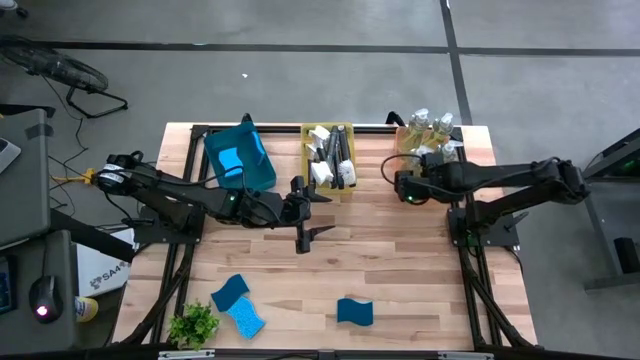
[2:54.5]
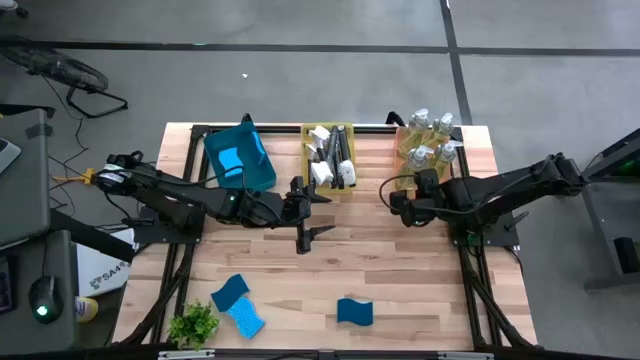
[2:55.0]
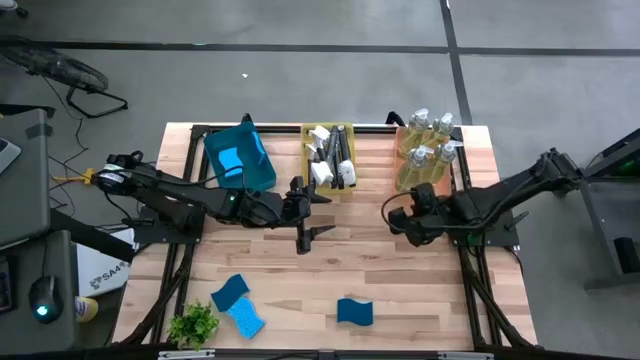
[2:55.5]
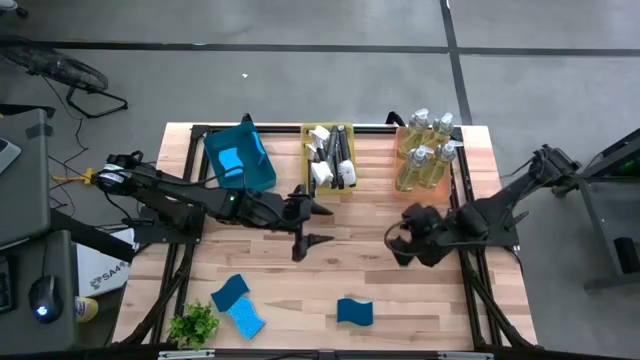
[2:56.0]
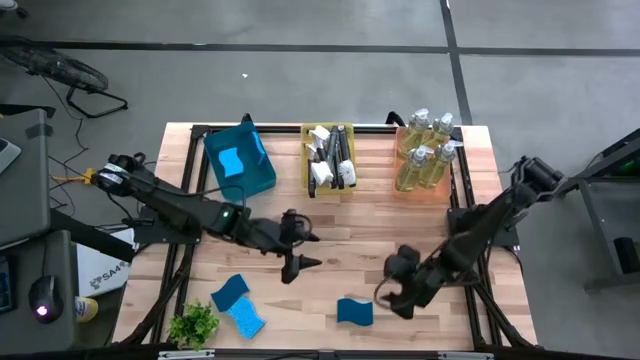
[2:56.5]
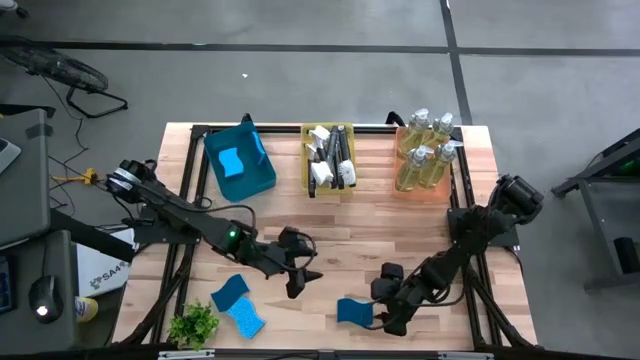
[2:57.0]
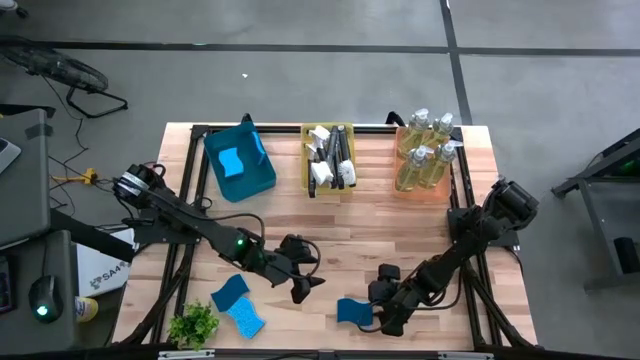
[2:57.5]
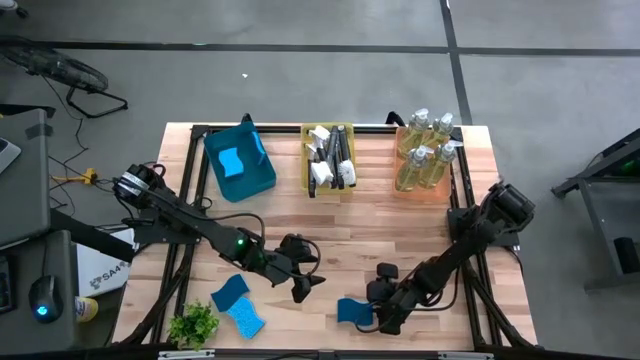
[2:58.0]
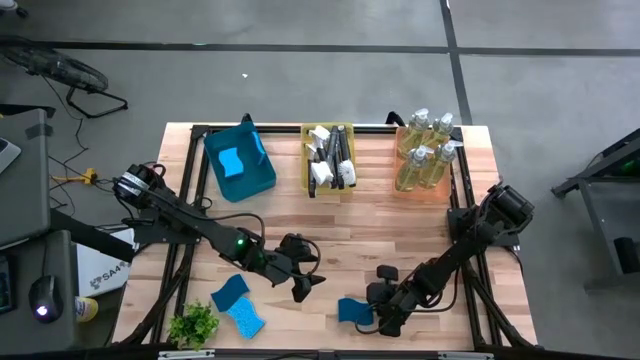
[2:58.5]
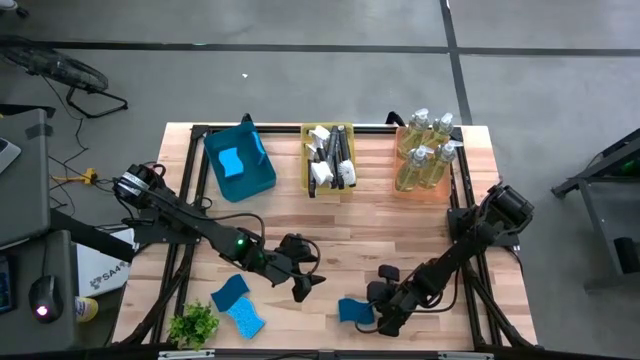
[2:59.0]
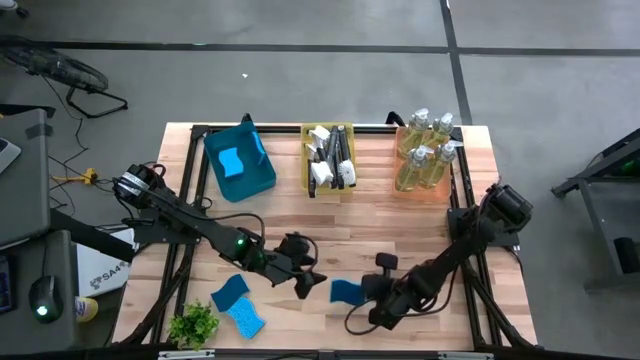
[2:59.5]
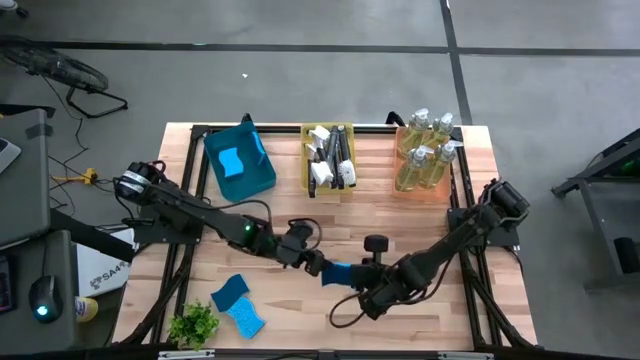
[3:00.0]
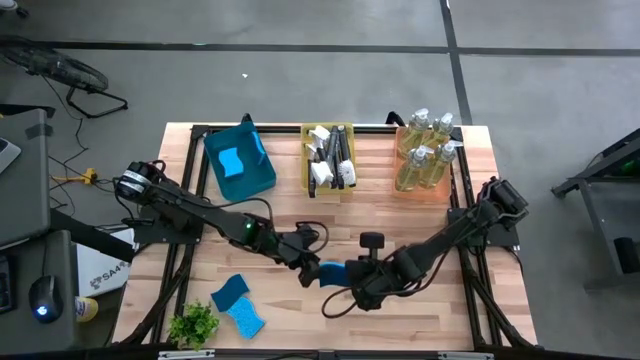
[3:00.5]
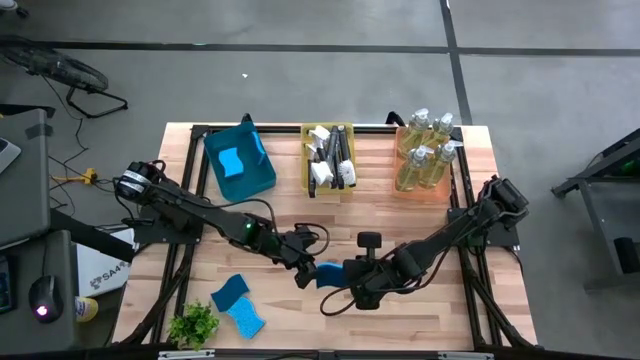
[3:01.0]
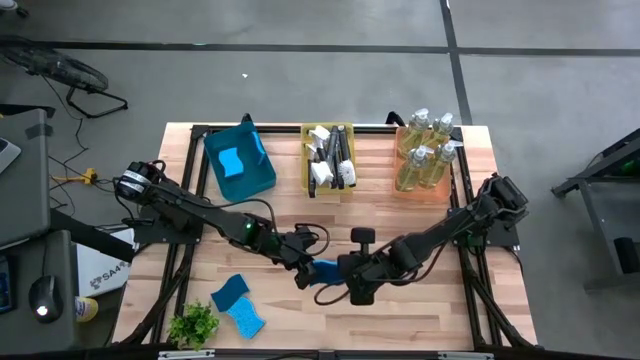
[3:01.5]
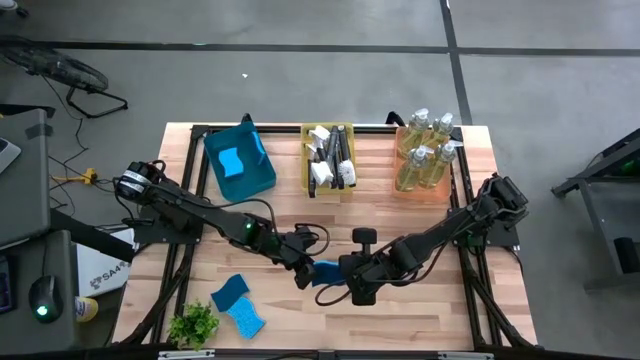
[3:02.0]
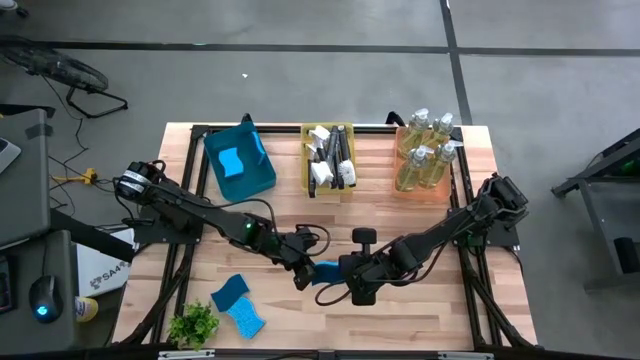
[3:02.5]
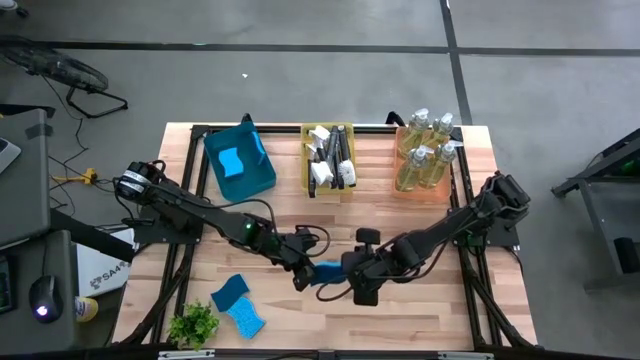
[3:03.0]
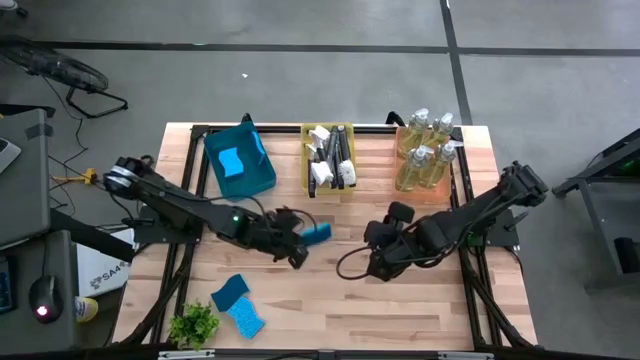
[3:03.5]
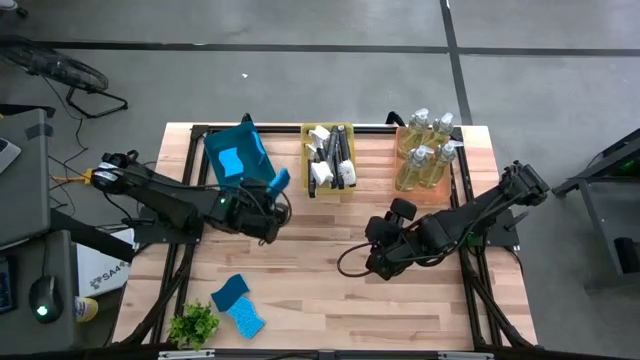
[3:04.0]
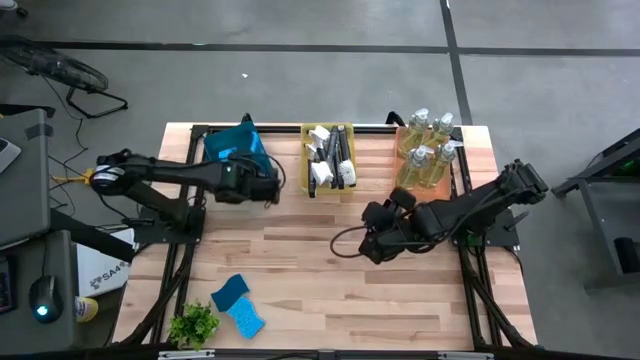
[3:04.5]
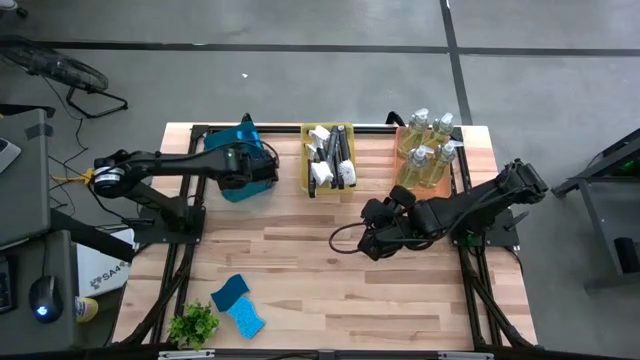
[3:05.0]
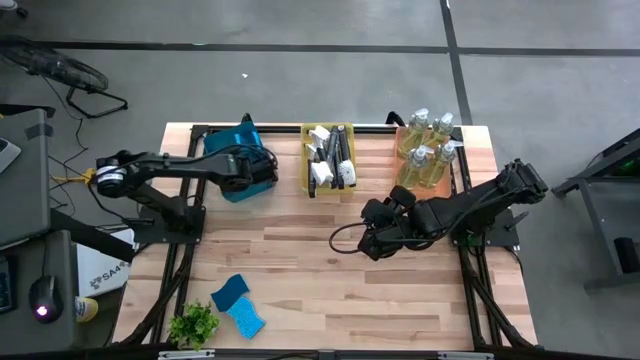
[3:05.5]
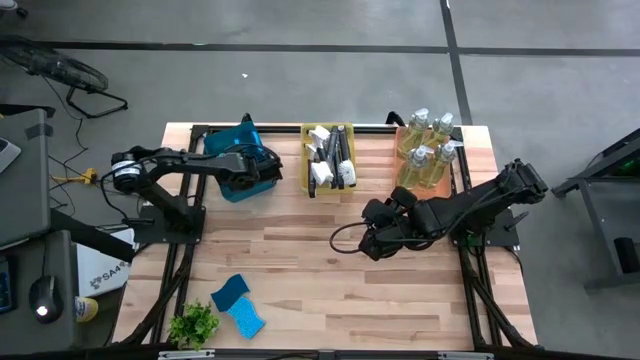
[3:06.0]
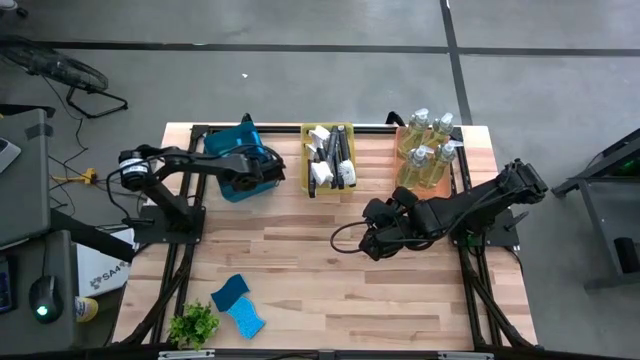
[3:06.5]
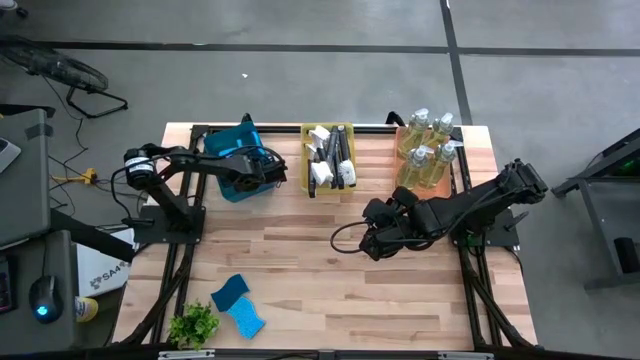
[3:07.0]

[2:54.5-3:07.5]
Task: Pick & Place Kitchen Sink Supplies
Put the blue dishwashing sponge into the blue bin
